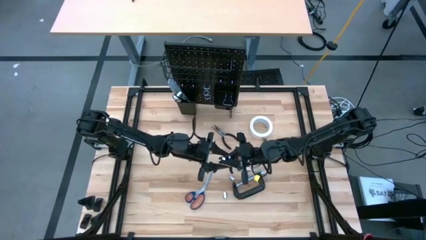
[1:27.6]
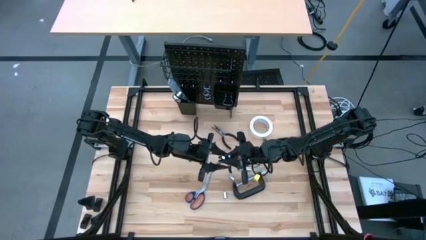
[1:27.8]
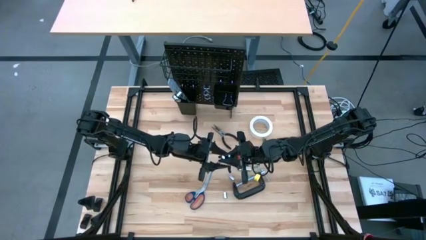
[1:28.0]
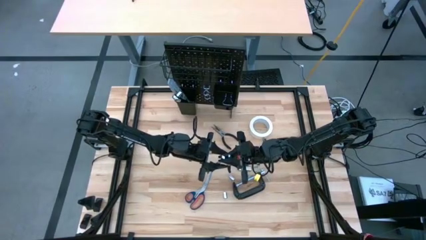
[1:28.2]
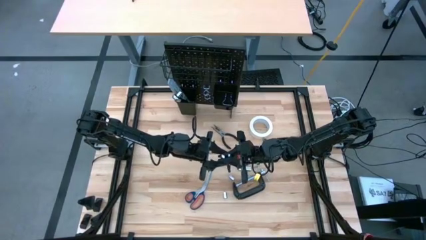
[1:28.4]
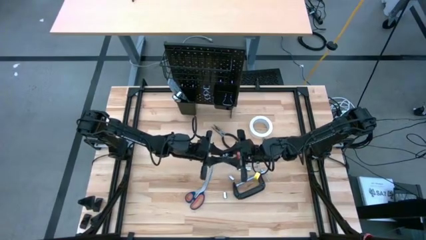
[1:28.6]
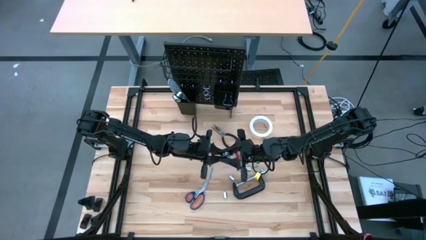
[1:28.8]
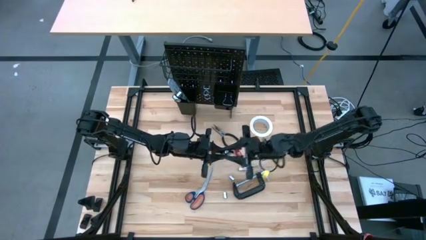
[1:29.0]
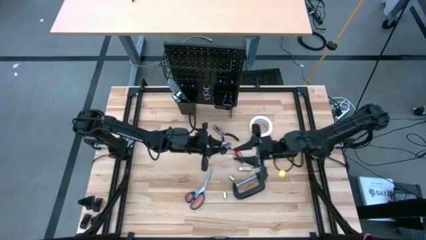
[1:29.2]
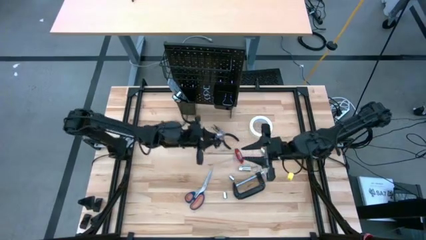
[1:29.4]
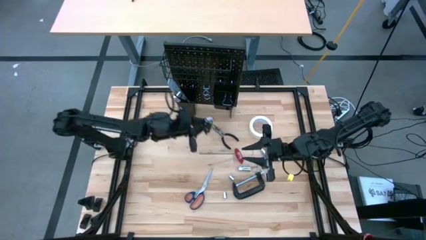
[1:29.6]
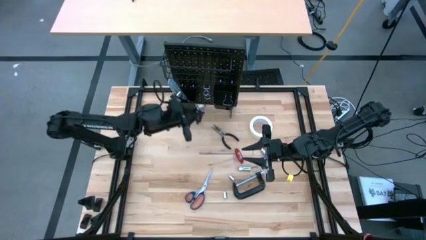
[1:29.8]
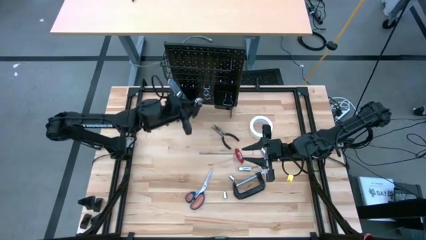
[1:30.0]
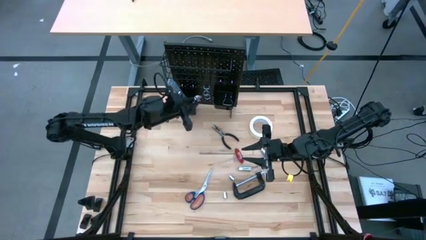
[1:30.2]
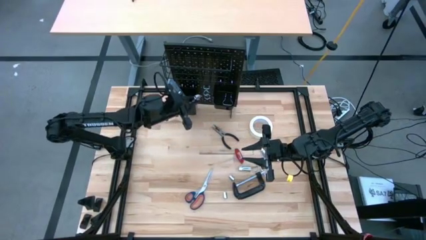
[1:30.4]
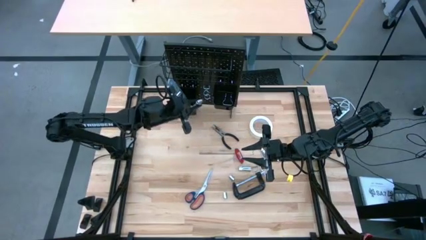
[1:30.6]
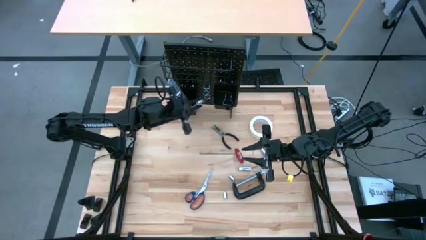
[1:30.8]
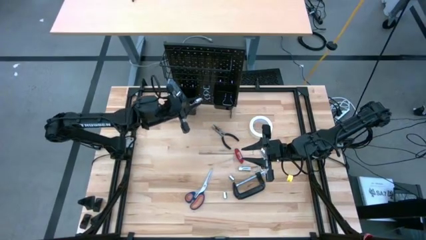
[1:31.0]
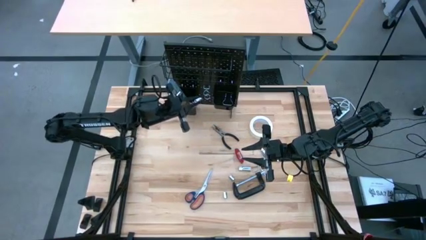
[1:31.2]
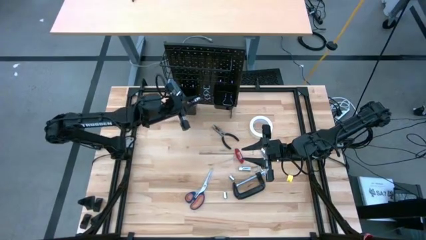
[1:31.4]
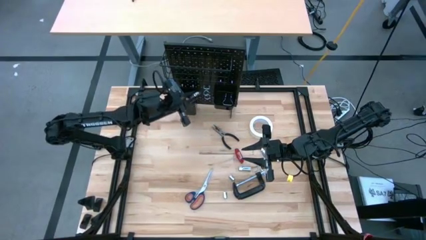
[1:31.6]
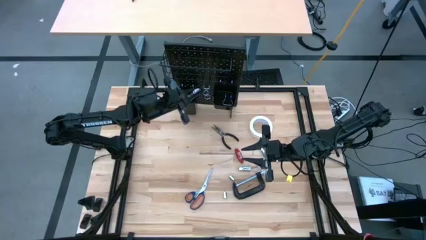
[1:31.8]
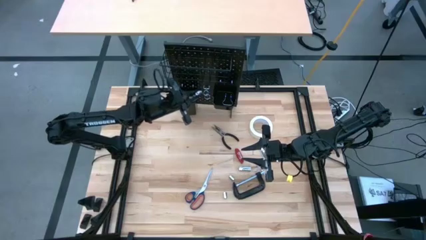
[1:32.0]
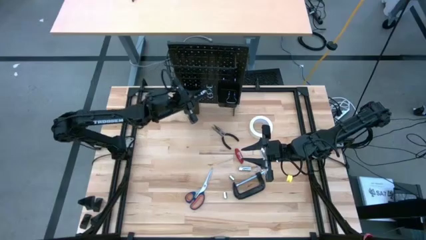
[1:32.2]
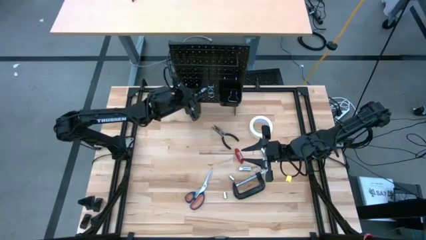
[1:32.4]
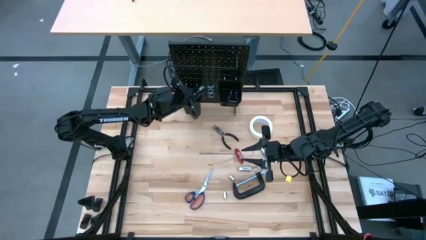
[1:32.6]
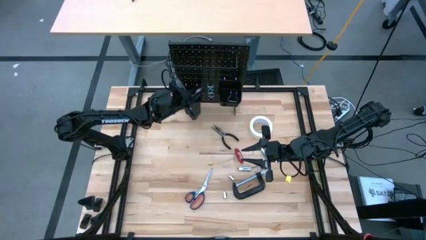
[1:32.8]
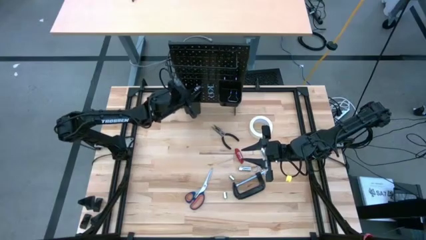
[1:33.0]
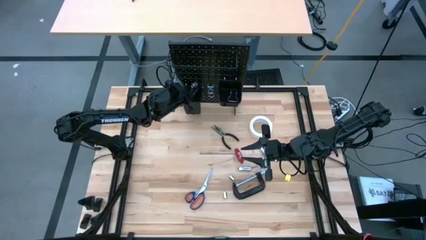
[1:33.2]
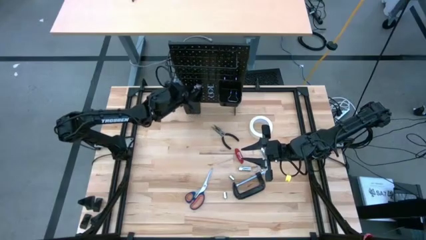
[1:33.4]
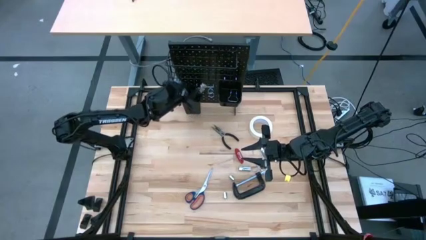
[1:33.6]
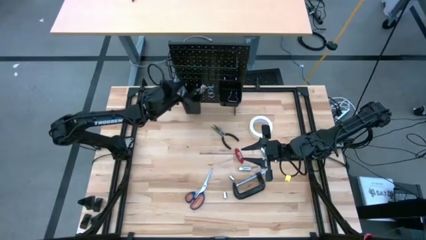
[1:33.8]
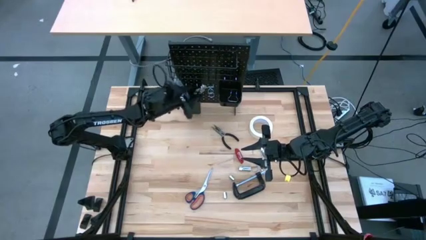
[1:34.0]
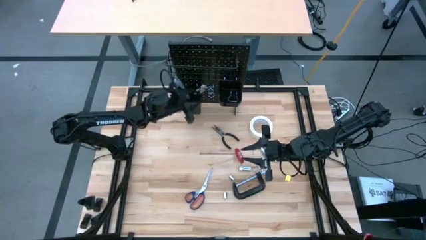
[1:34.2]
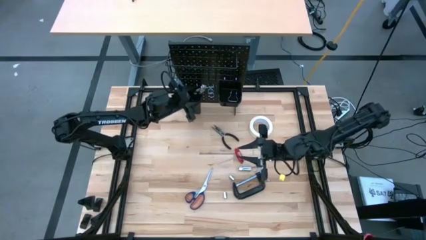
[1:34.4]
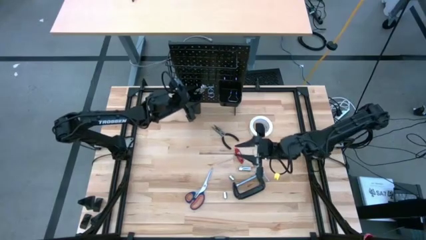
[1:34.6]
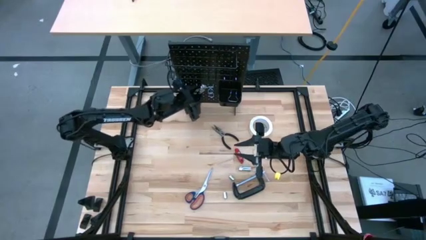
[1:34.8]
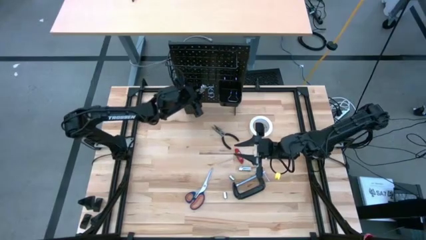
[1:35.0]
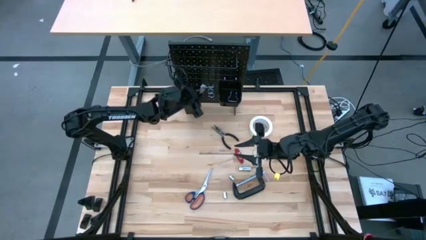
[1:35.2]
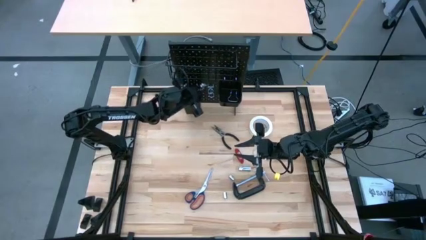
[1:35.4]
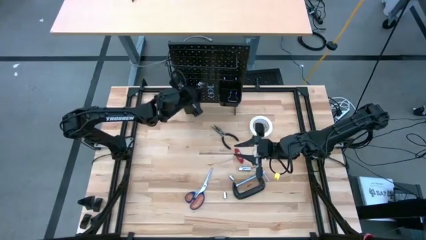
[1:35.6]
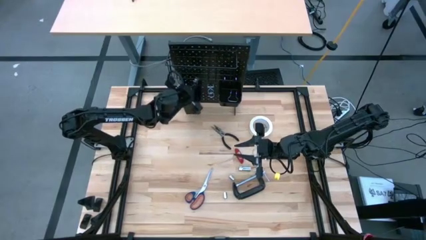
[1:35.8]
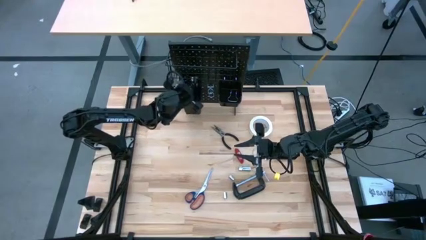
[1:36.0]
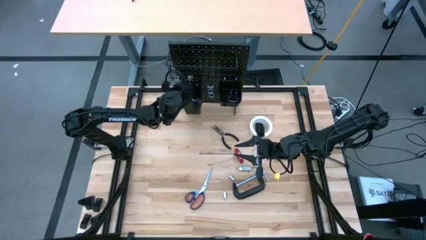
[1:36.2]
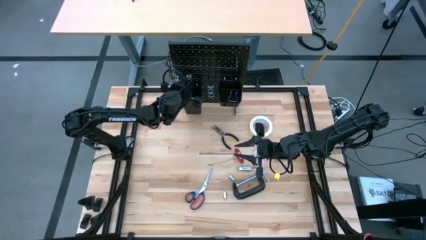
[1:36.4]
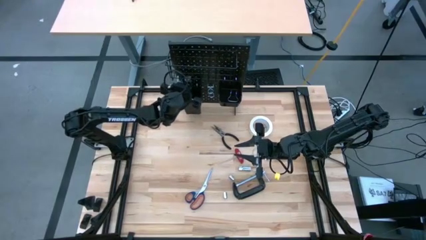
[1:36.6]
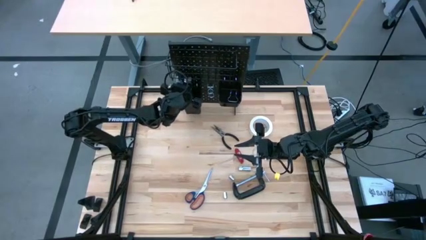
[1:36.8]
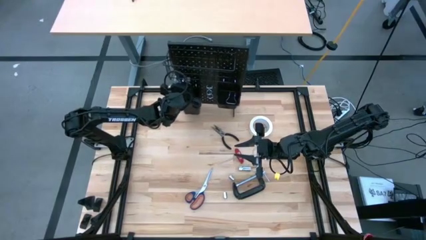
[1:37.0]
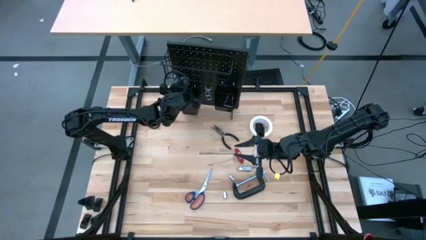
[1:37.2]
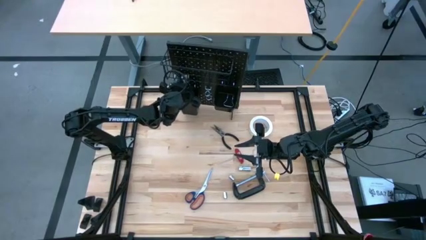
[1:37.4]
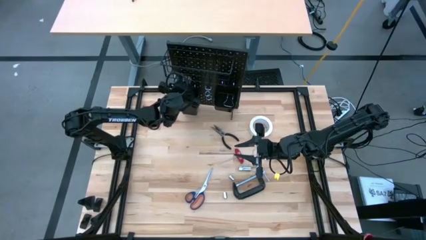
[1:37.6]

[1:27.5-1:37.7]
Task: Hang tools onto peg board
Put the black slip joint pliers into the left black bin on the peg board

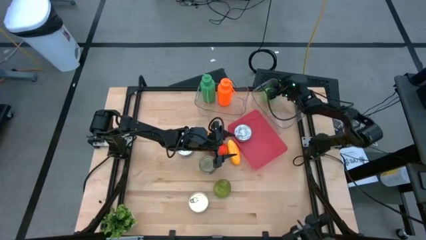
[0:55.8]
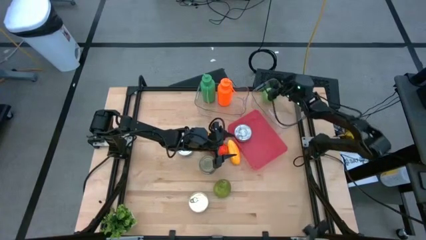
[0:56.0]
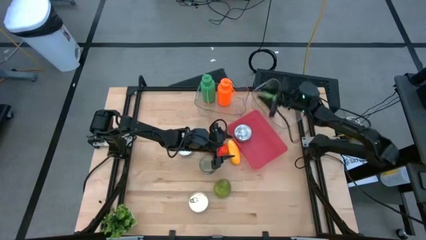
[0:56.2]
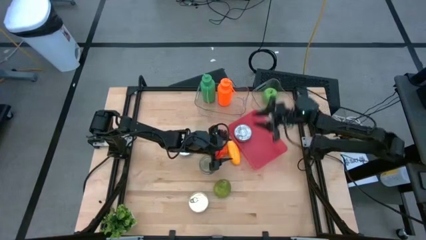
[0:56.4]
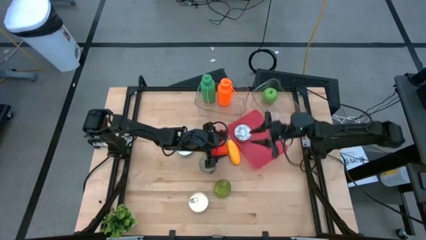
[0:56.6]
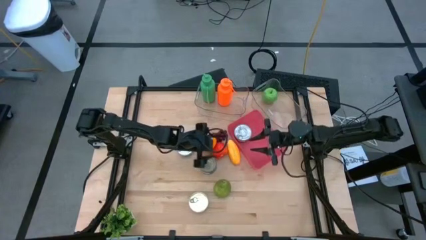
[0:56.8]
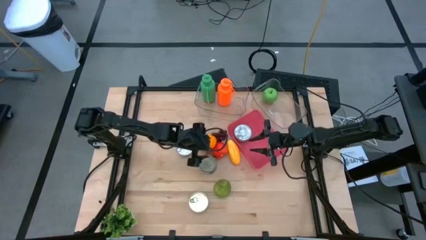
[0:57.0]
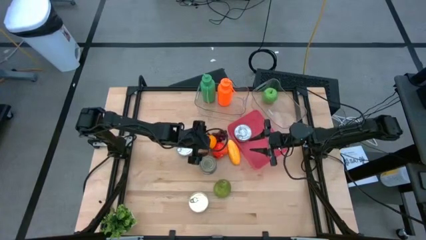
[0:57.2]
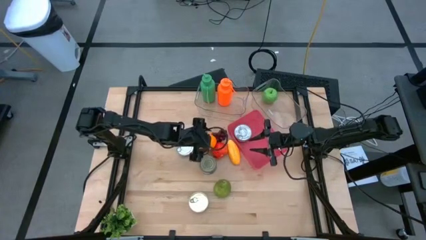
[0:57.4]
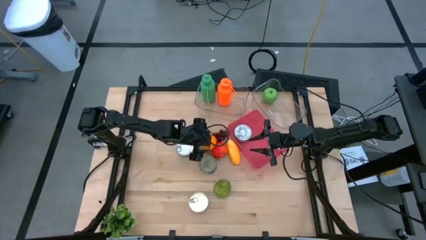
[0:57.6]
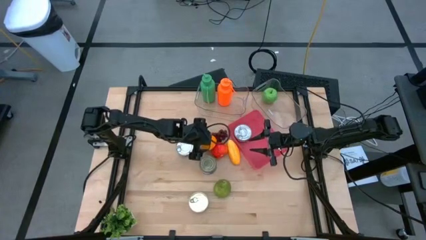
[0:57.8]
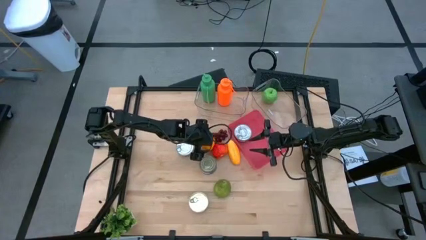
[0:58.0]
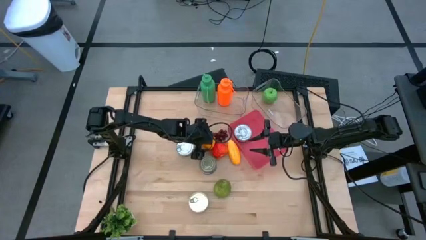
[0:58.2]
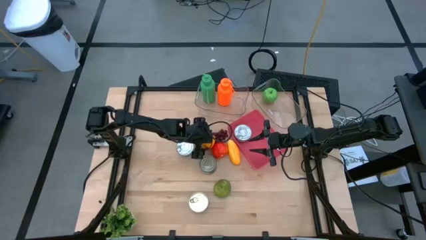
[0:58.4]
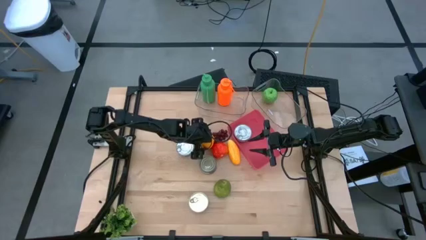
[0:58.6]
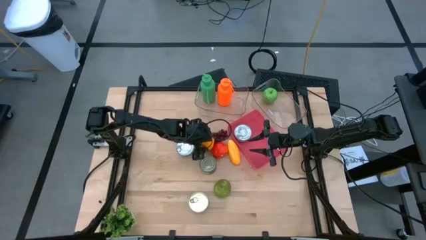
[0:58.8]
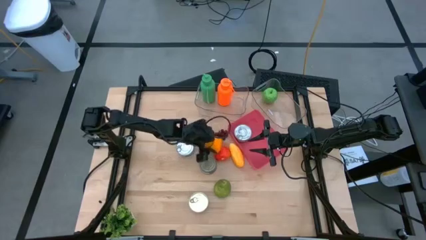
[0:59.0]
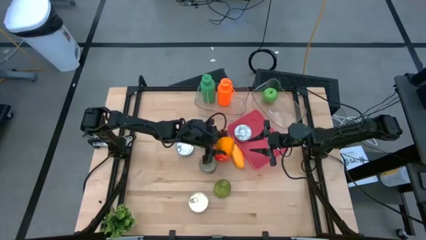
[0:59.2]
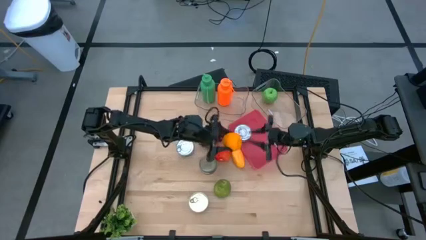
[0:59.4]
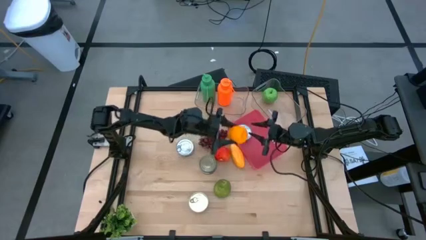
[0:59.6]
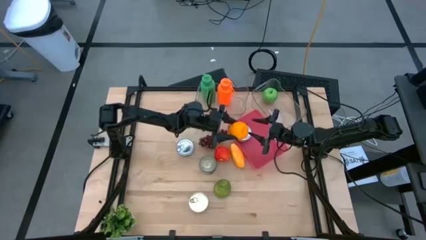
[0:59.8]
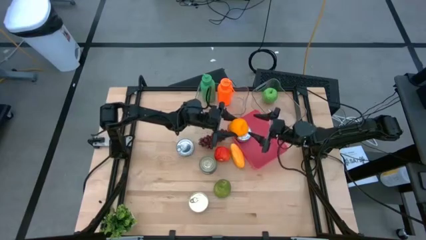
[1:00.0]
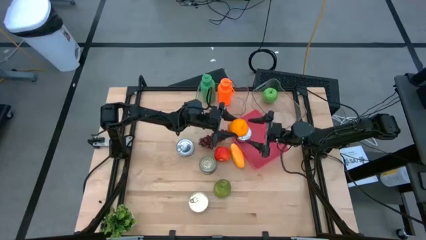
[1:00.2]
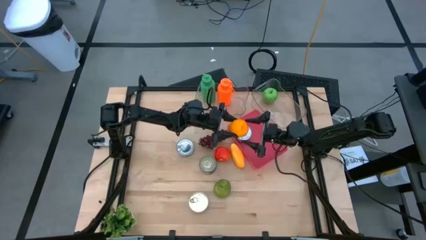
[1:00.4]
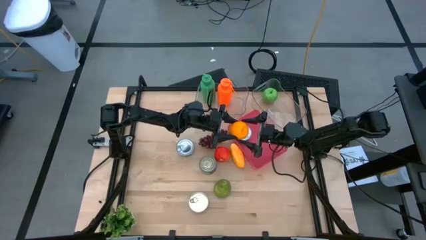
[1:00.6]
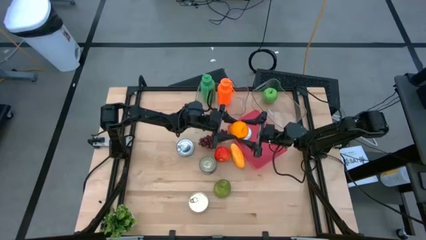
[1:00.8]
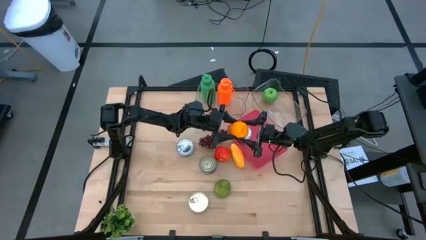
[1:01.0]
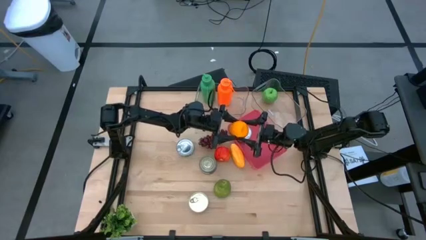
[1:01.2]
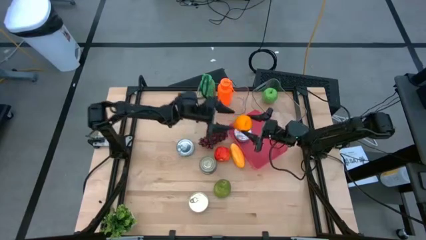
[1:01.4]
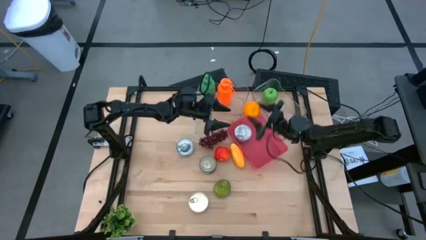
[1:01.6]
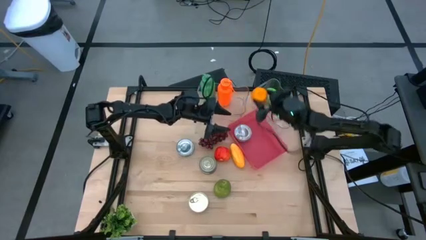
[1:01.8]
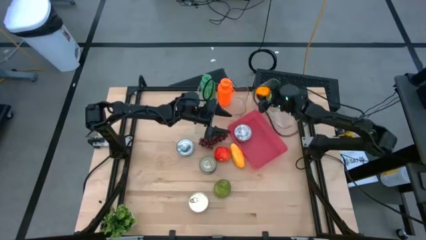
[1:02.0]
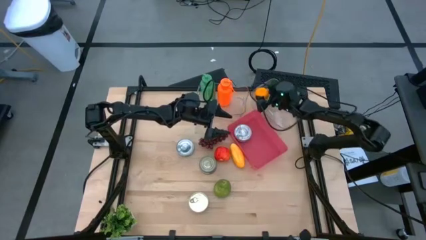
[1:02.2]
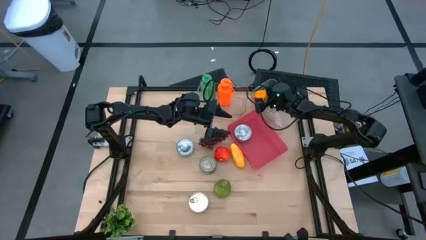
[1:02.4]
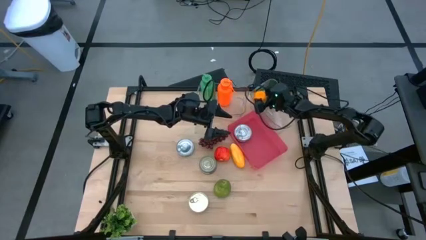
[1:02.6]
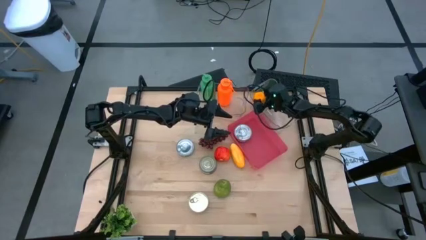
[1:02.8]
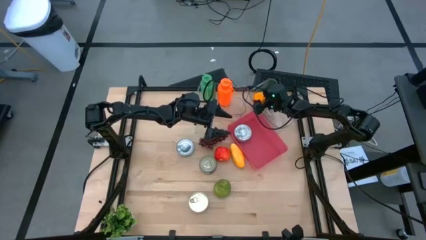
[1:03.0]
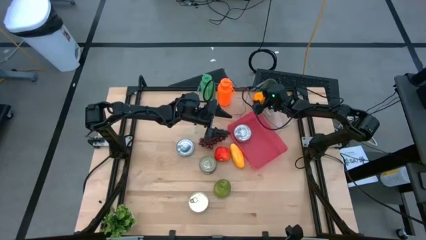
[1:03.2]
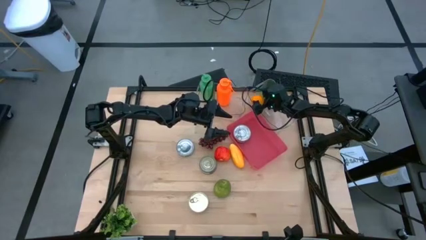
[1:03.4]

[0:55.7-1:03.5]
Task: Pick & Place Food Item
Put the orange into the right transparent bin
